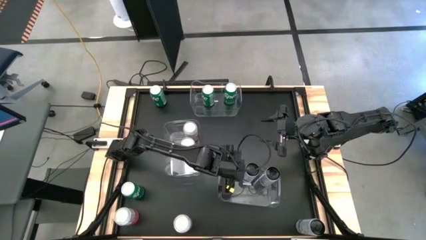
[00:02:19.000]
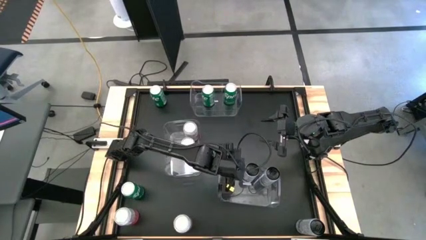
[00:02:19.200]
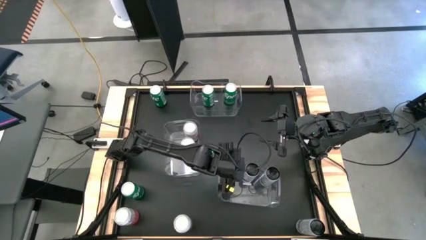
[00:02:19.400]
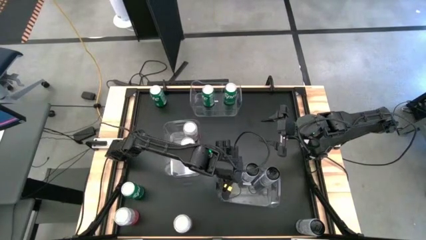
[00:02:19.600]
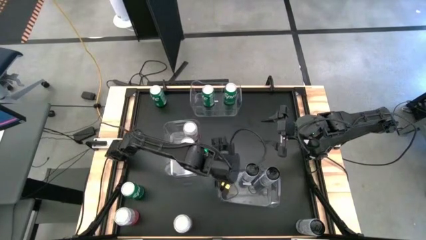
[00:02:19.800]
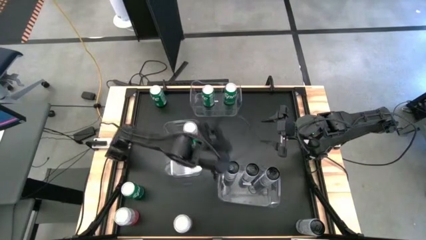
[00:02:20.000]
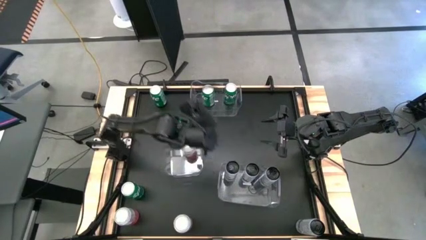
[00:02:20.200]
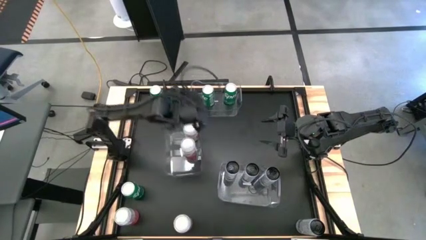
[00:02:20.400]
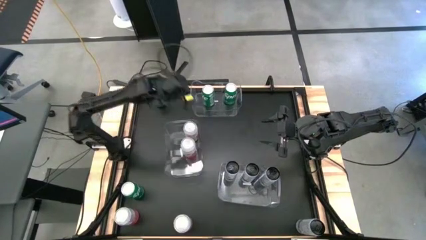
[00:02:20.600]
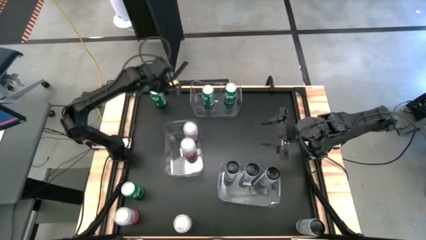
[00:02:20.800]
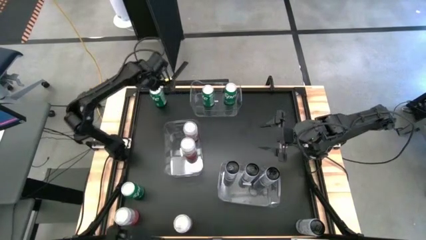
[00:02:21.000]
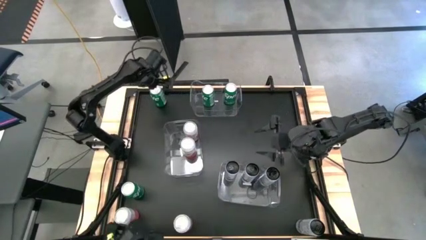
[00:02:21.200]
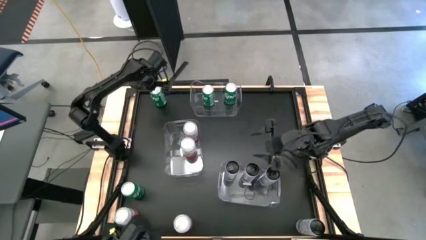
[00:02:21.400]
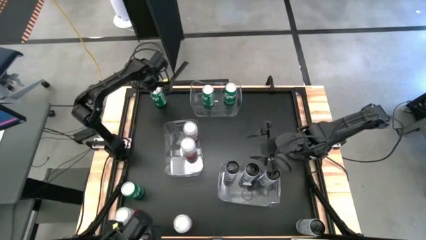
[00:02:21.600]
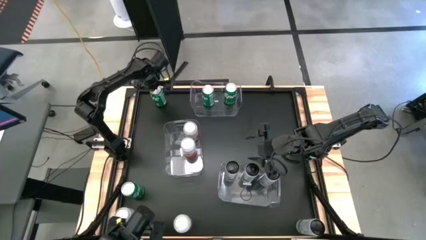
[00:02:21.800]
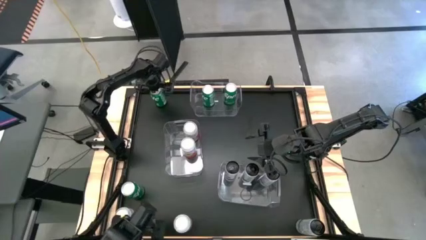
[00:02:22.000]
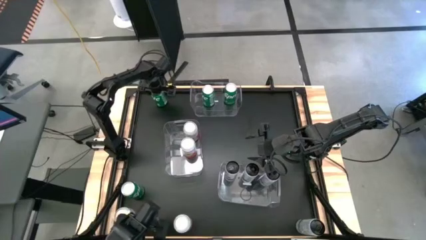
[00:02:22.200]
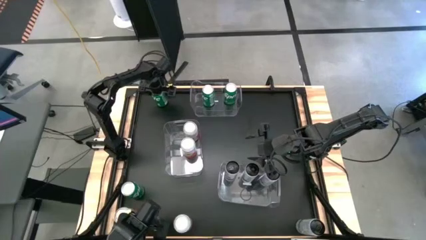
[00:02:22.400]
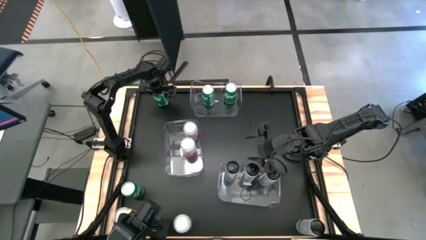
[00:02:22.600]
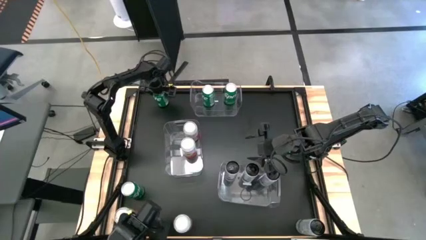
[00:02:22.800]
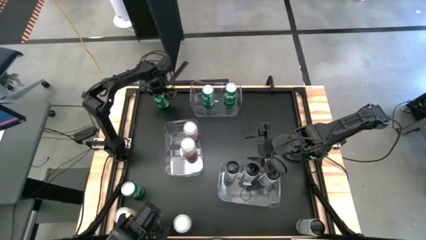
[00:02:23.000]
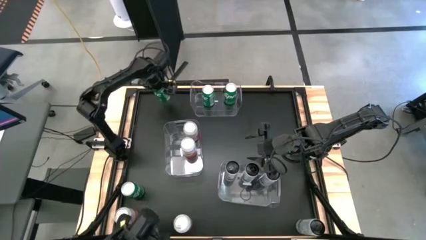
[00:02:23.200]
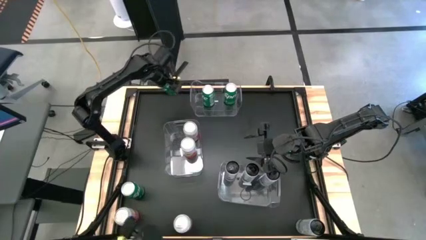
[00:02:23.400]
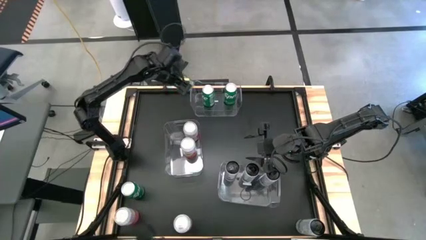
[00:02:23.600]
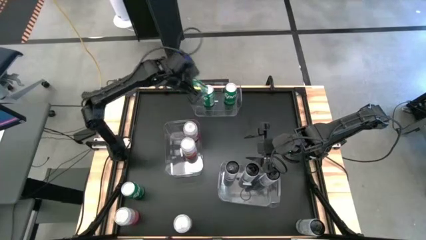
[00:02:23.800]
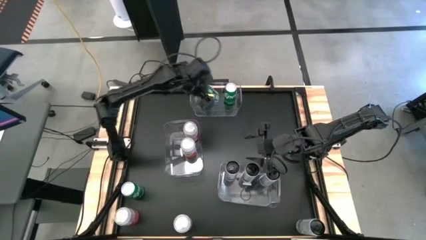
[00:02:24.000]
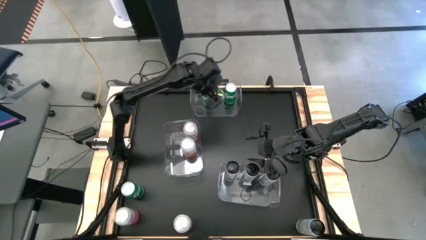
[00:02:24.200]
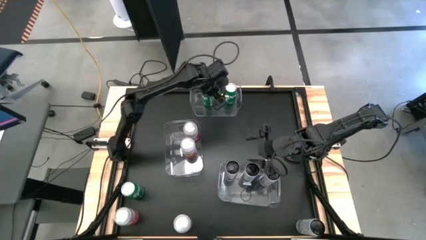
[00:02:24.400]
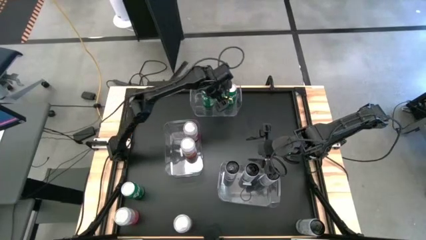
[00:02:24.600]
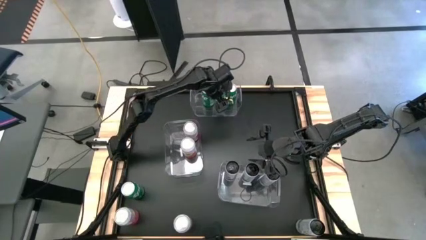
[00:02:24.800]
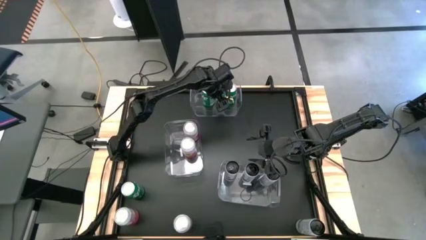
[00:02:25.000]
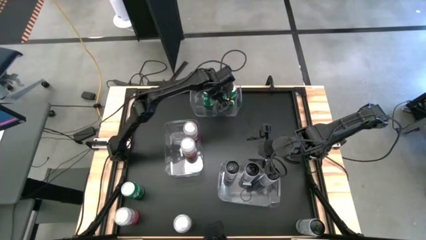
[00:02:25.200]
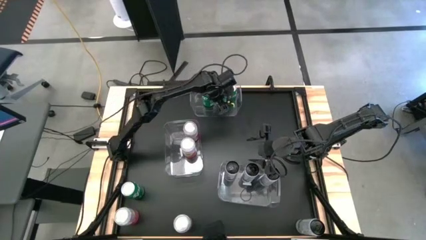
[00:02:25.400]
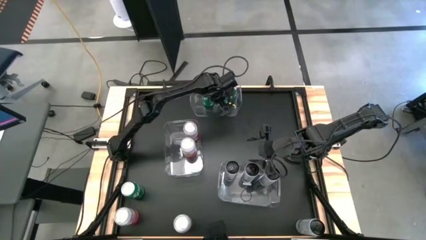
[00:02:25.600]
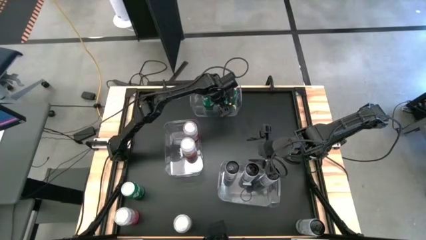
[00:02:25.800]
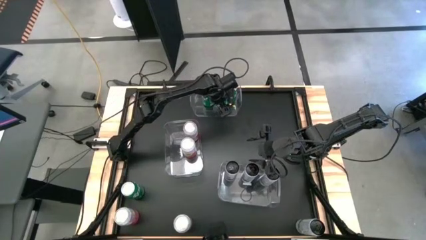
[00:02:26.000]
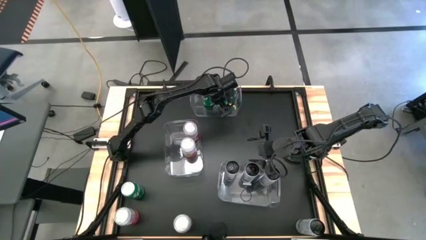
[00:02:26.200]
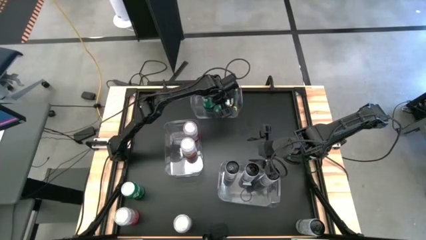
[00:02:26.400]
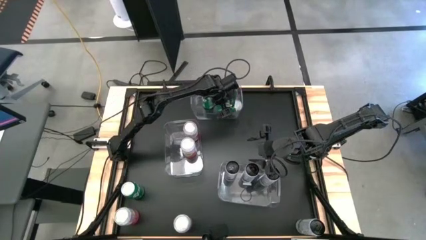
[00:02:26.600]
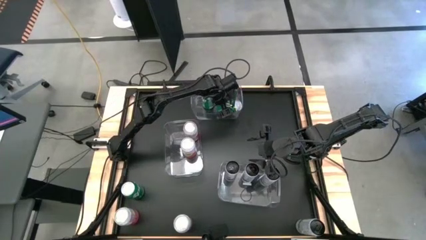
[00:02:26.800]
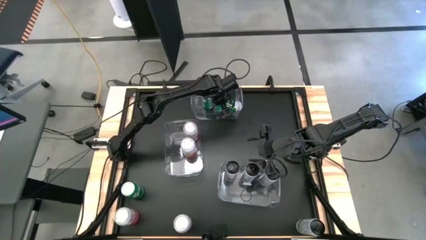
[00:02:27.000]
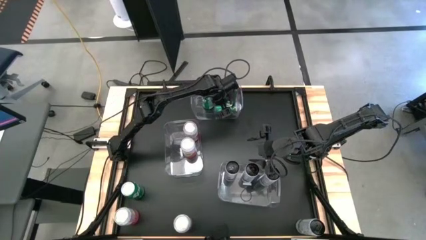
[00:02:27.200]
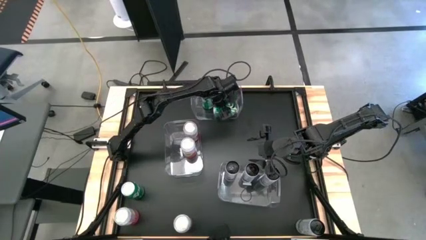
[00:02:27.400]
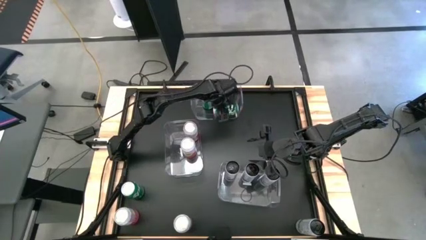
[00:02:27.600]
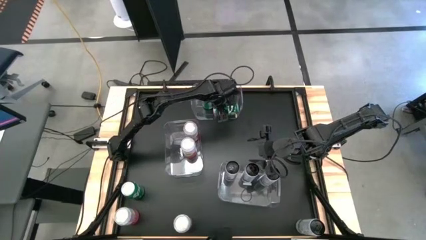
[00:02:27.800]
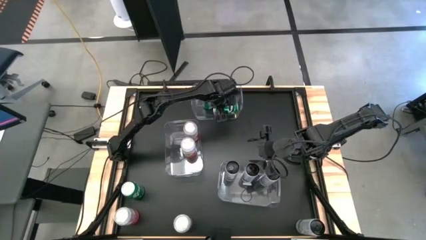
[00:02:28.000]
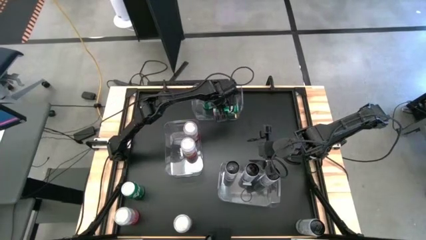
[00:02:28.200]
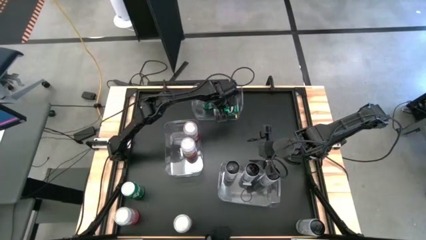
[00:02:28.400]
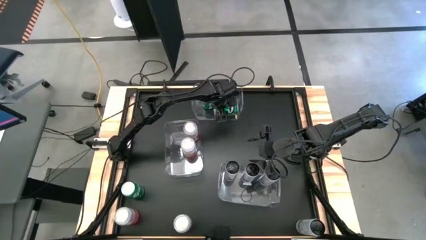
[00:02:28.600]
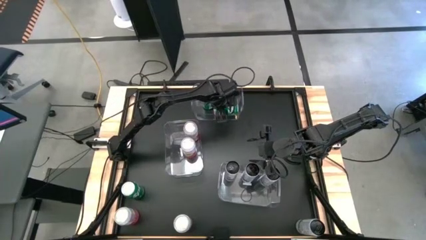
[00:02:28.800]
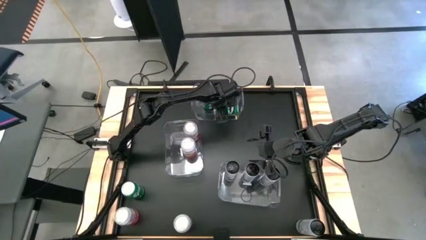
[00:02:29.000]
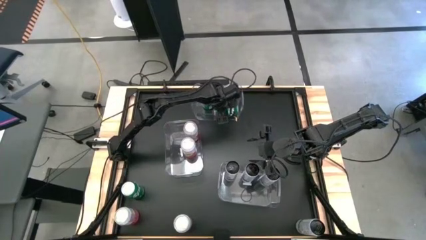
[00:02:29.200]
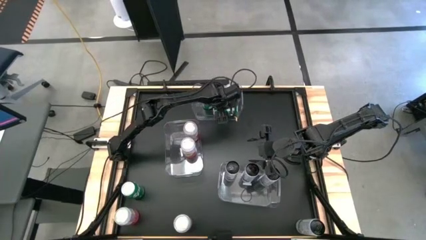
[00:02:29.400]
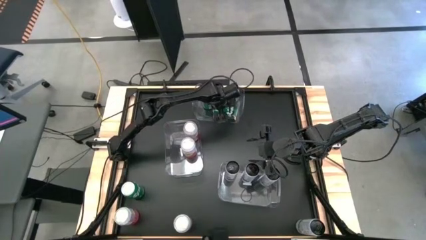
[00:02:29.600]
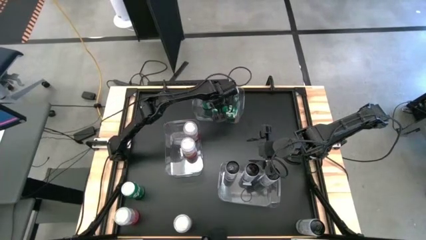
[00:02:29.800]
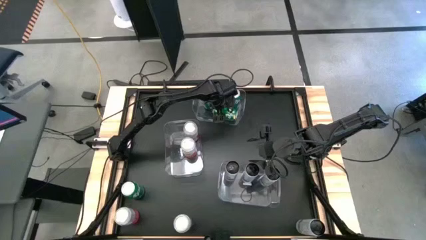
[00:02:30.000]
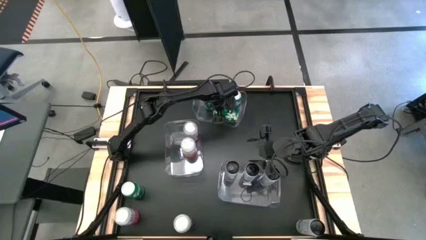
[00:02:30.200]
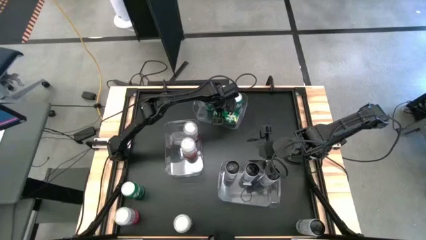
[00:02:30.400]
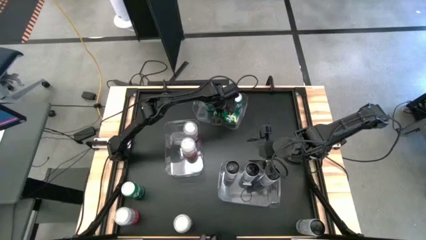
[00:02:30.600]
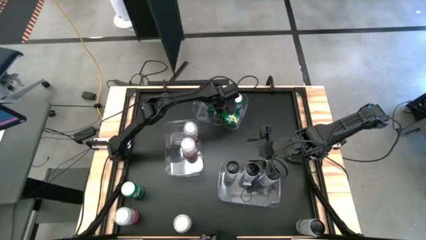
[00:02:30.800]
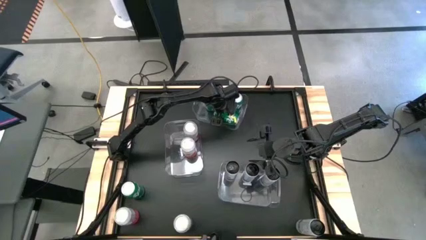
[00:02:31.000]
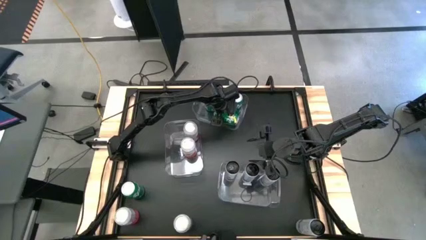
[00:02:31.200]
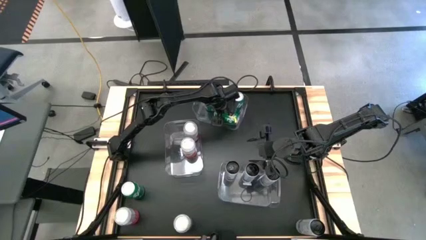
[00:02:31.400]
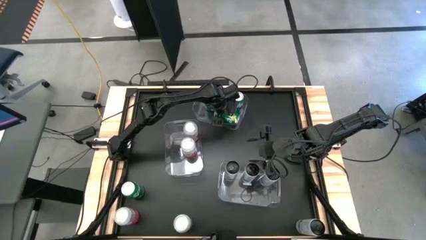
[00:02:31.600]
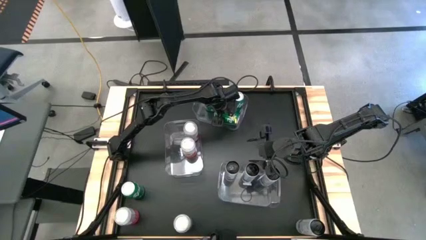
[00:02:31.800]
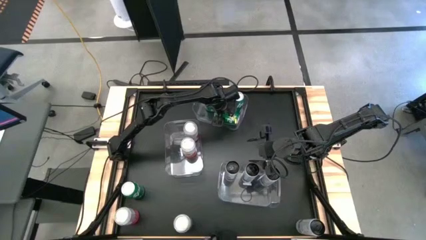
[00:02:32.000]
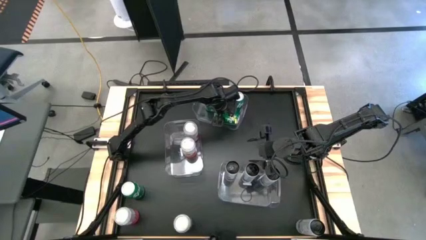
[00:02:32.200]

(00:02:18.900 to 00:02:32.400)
Task: Sort soda cans
Put the green soda can into the top transparent bin
